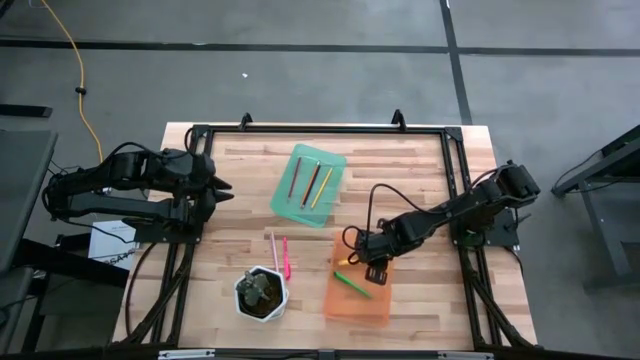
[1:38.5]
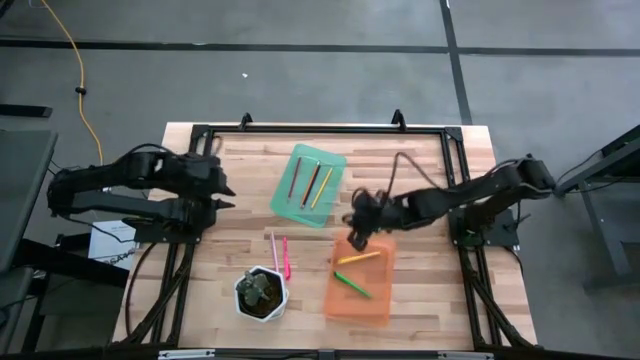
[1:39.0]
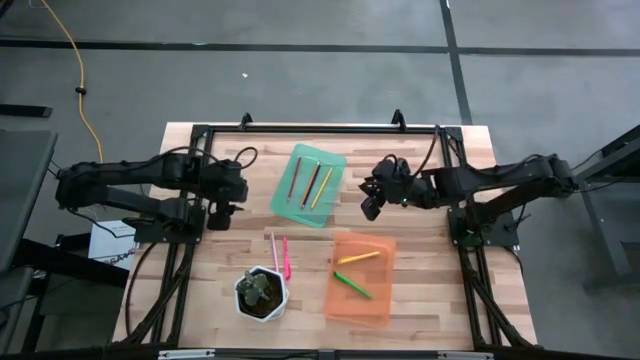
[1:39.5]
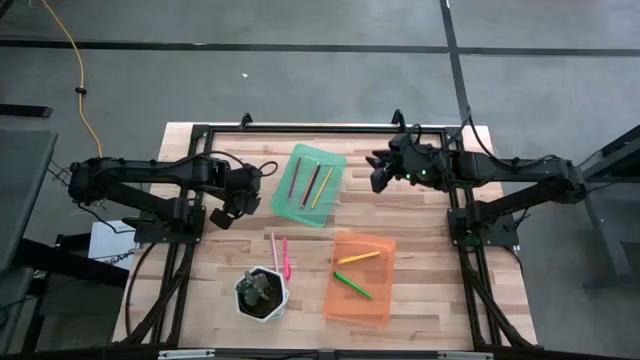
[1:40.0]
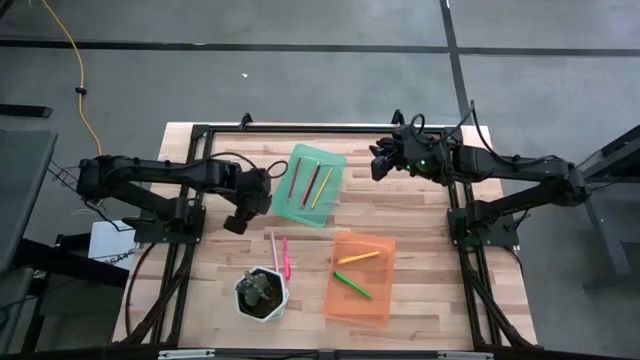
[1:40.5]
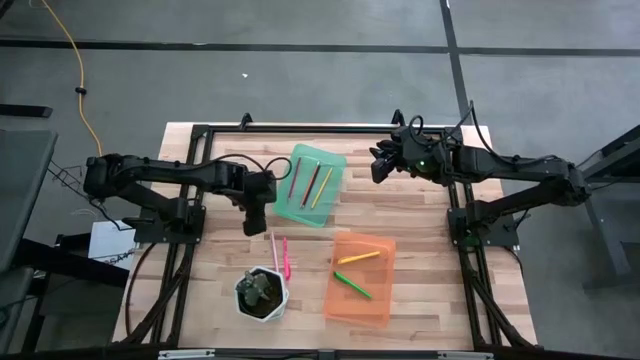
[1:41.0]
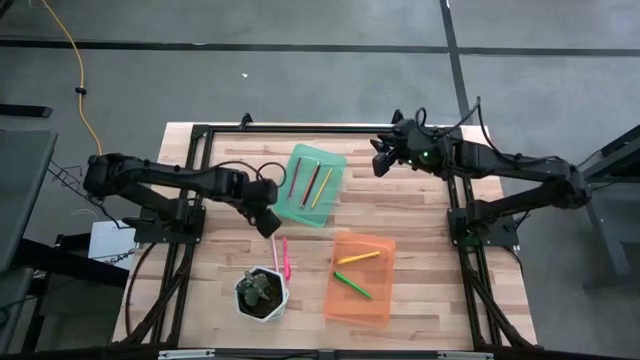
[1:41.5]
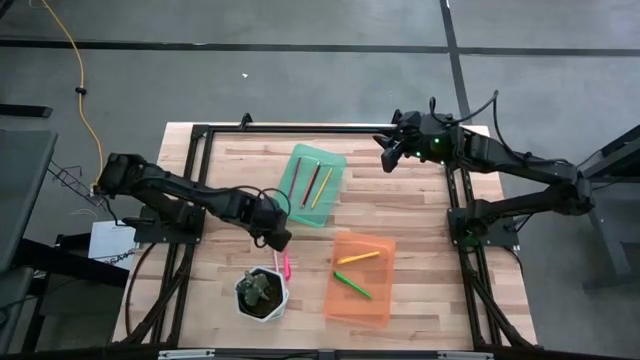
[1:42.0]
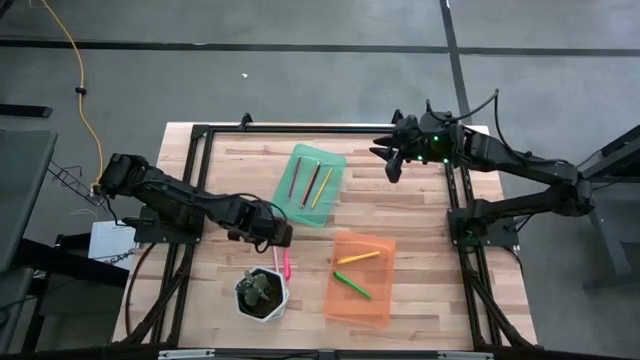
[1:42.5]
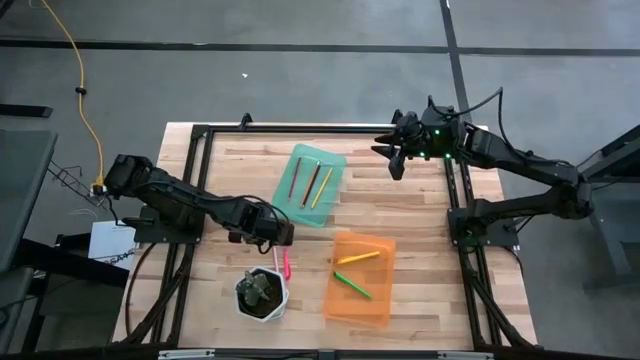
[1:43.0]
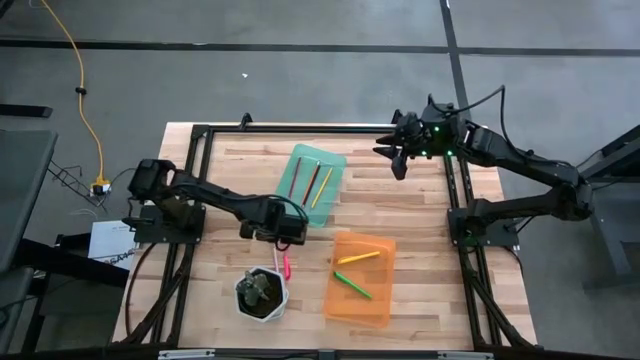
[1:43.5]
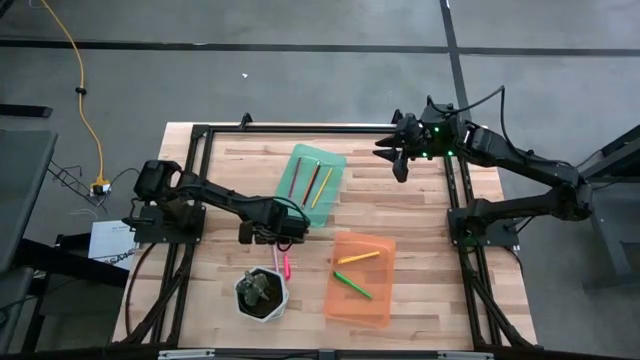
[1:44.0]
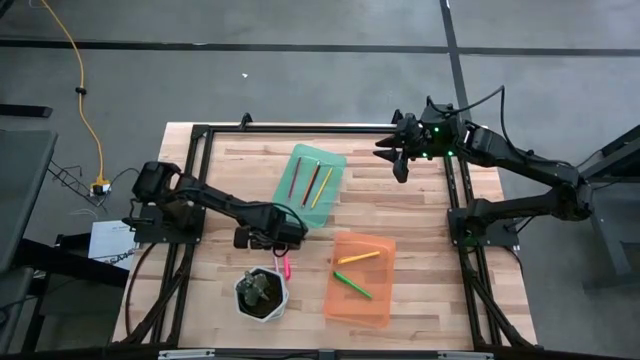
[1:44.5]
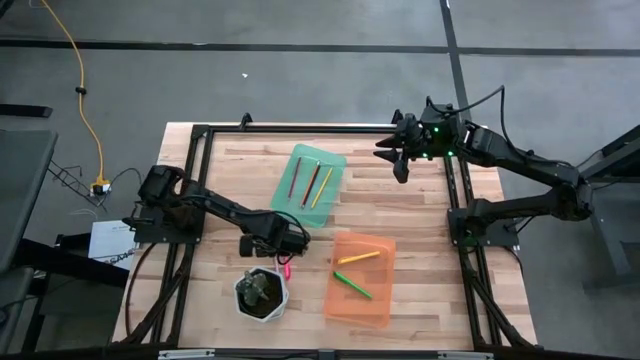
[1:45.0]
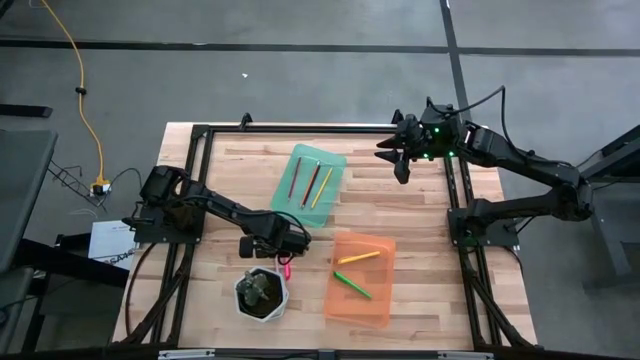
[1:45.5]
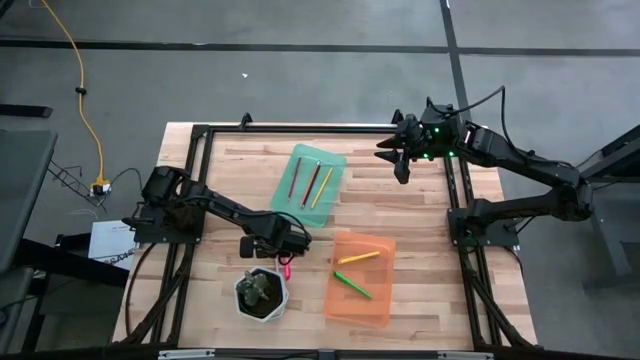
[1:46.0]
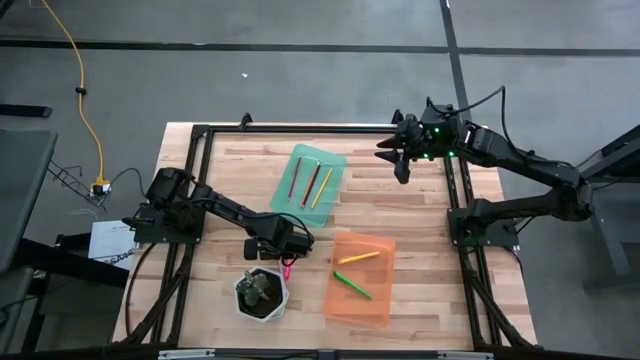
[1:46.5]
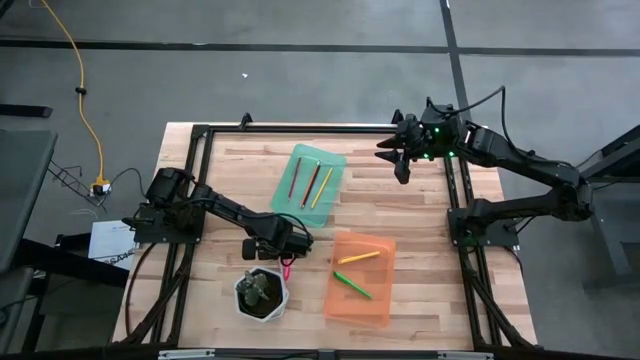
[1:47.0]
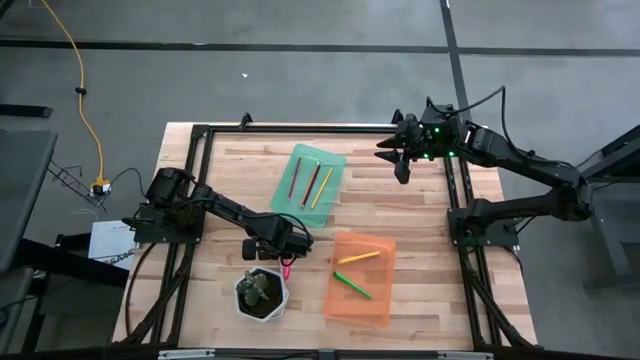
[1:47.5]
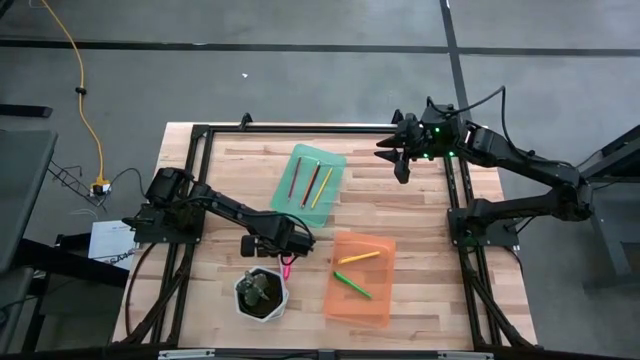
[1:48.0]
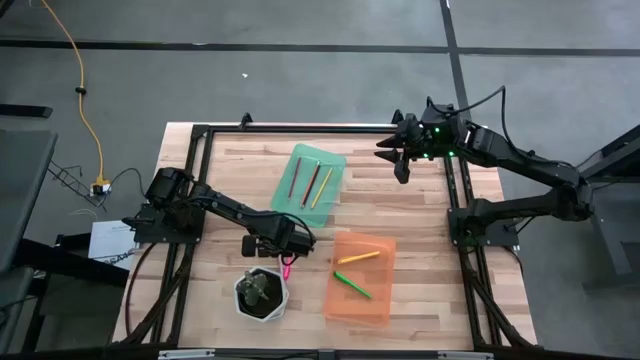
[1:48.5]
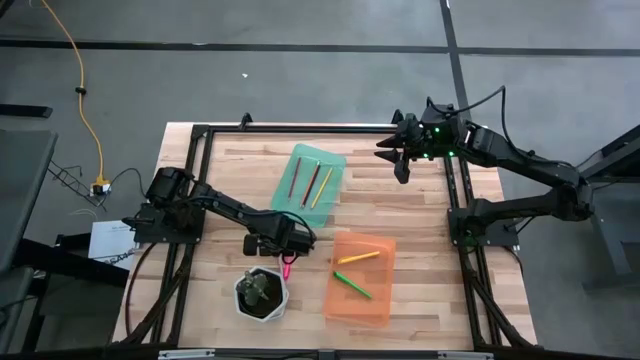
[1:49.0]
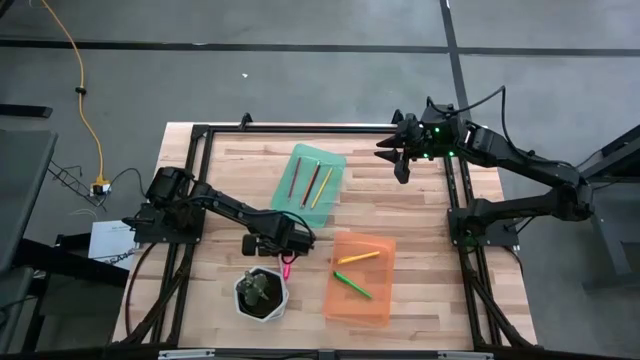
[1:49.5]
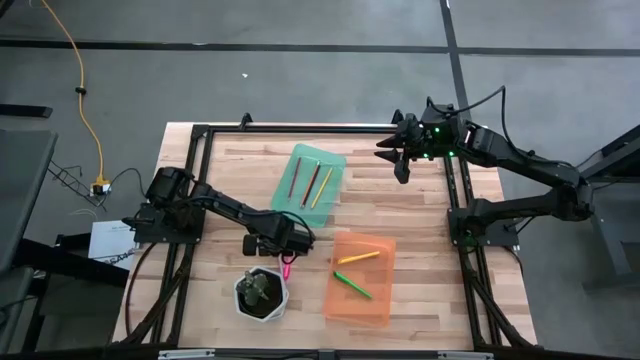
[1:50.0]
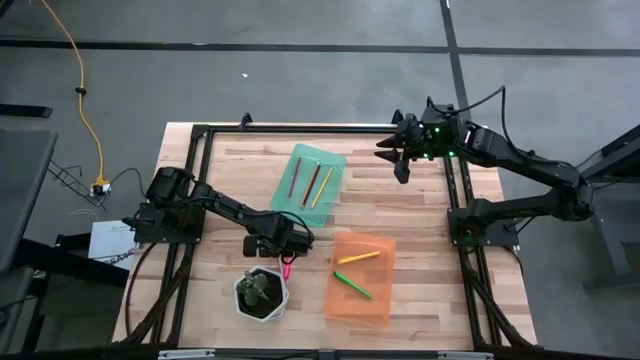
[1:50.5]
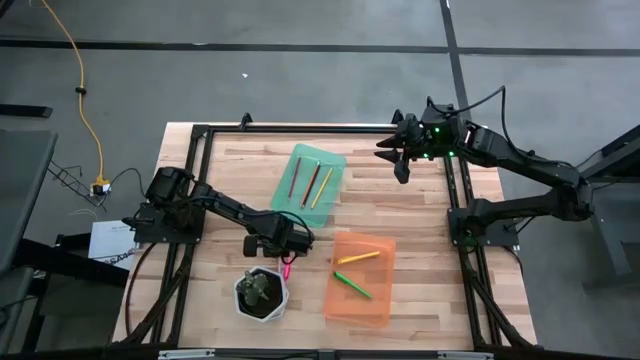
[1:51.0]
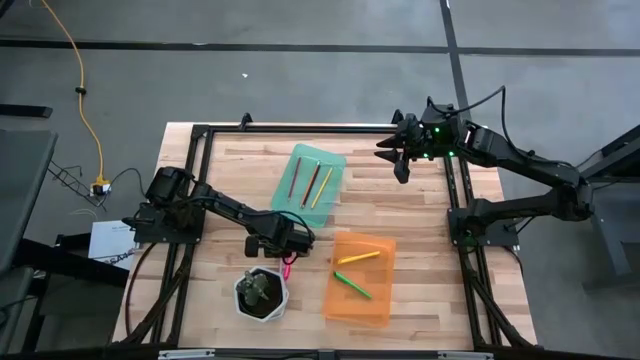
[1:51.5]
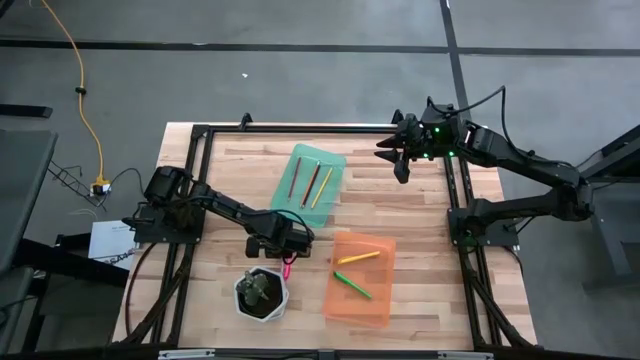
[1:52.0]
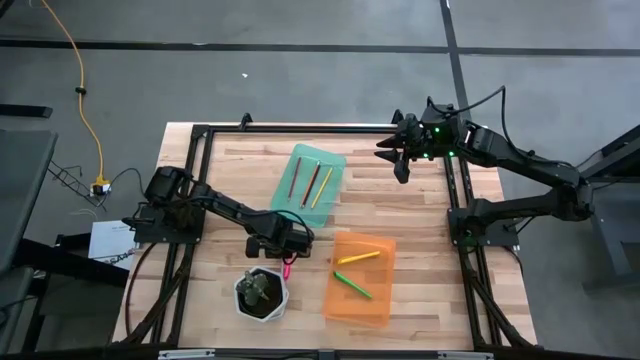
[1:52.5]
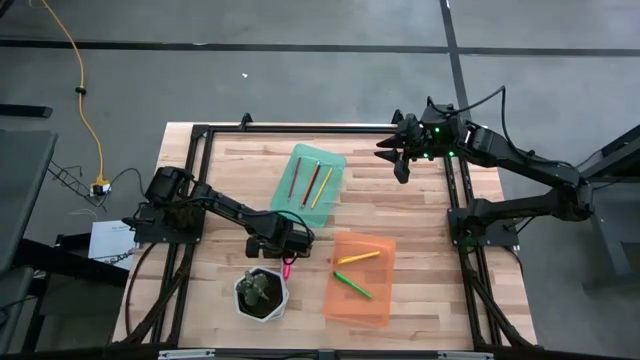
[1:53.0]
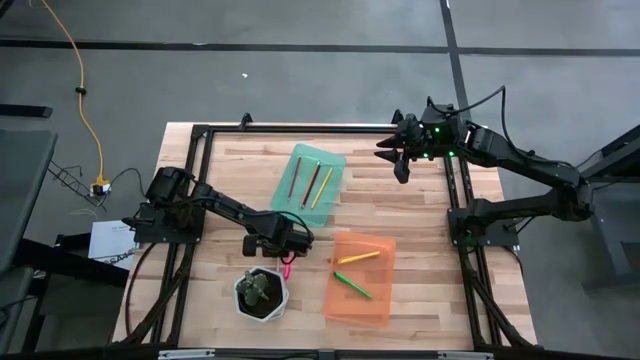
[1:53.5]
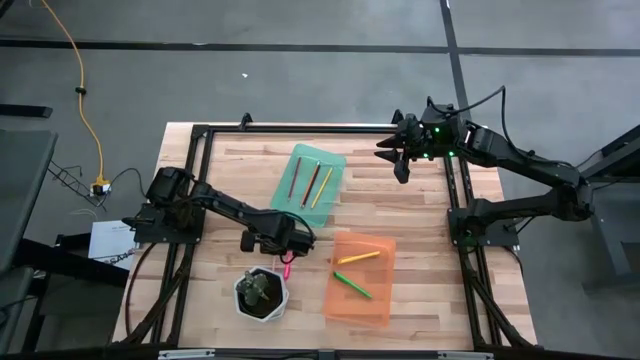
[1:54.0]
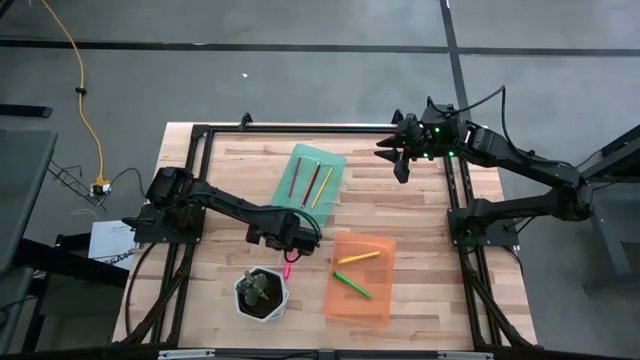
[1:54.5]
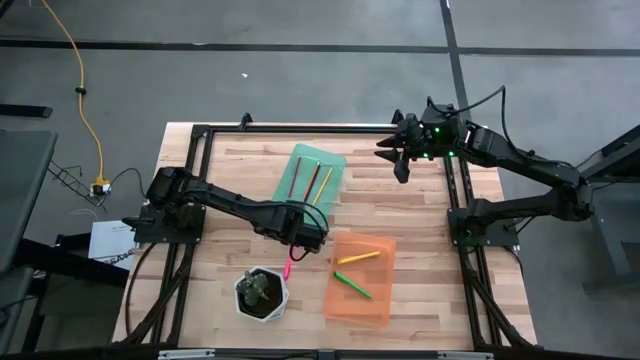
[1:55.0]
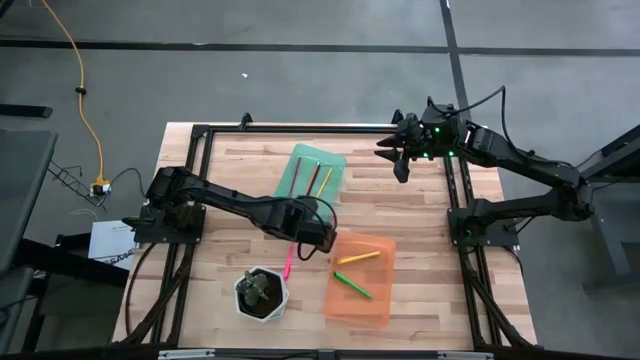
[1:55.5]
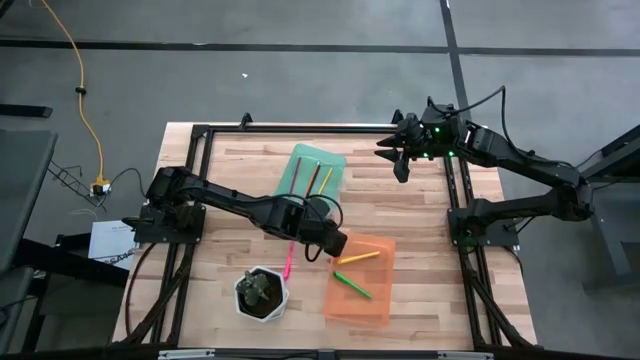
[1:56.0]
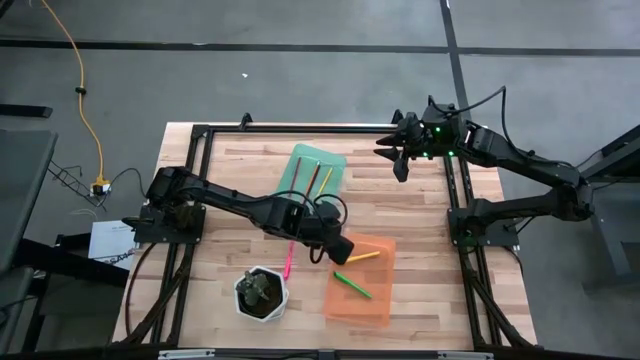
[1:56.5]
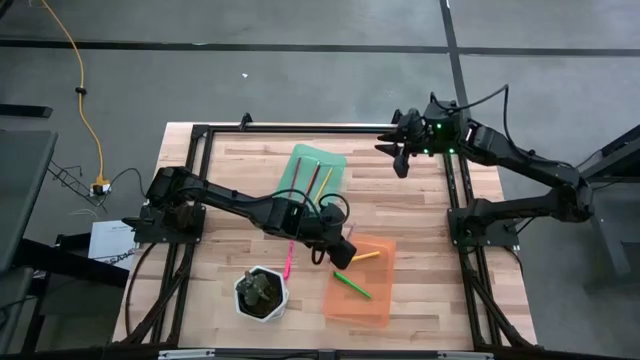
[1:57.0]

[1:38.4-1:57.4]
Task: Sort pens & pencils
Put the light pink pen into the orange bin
